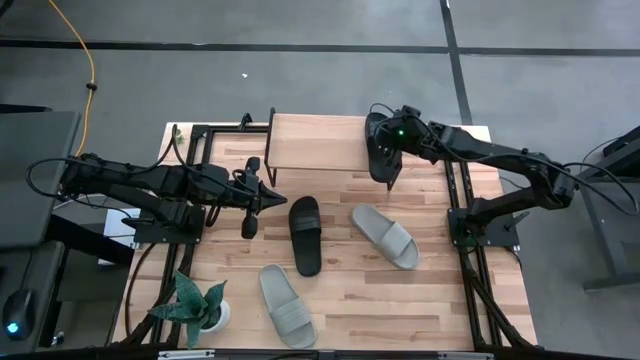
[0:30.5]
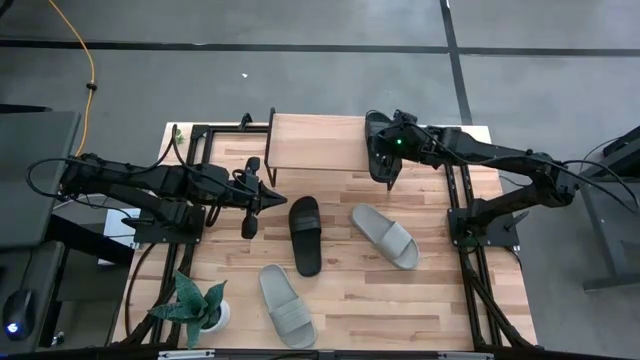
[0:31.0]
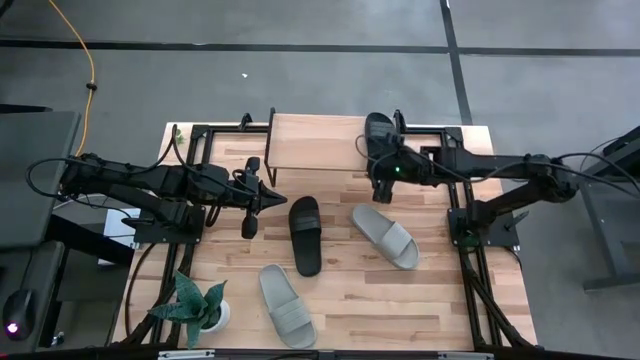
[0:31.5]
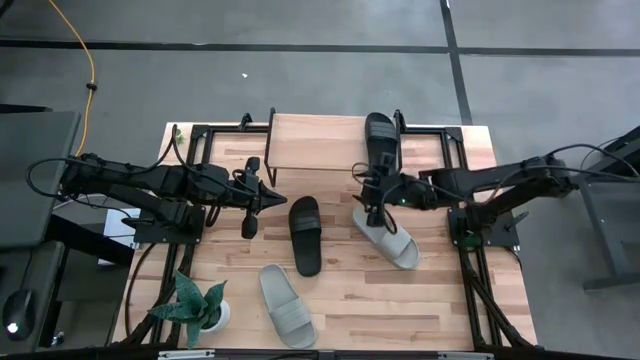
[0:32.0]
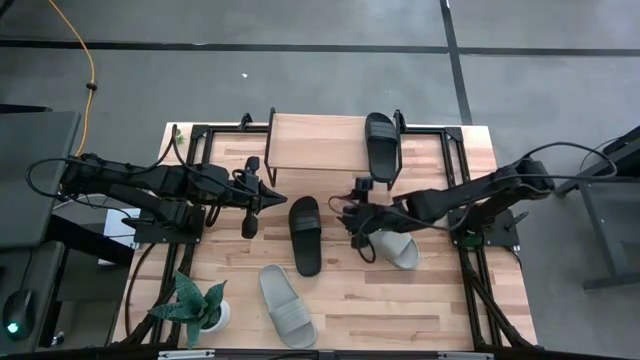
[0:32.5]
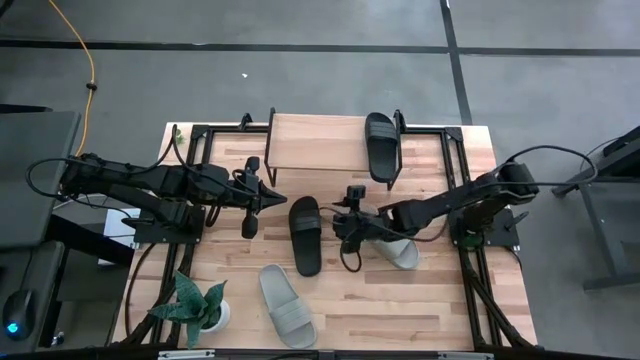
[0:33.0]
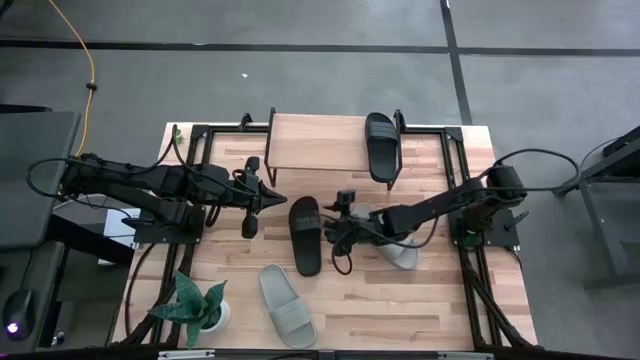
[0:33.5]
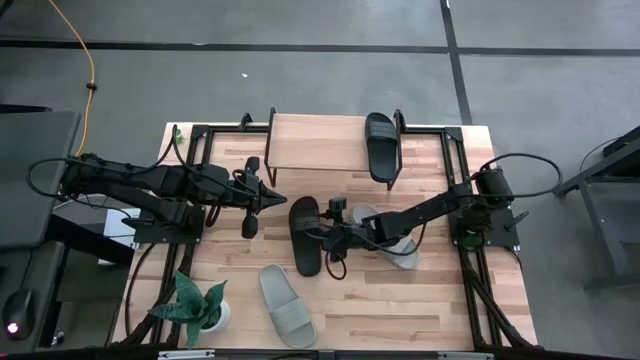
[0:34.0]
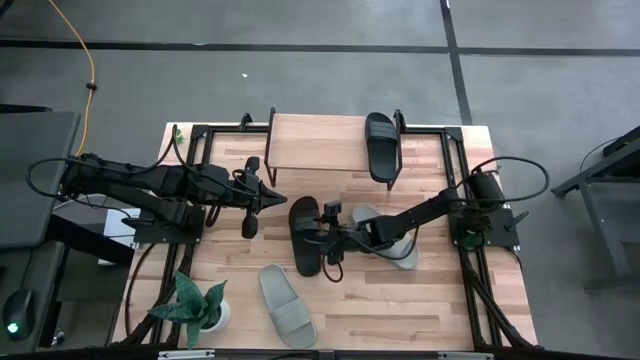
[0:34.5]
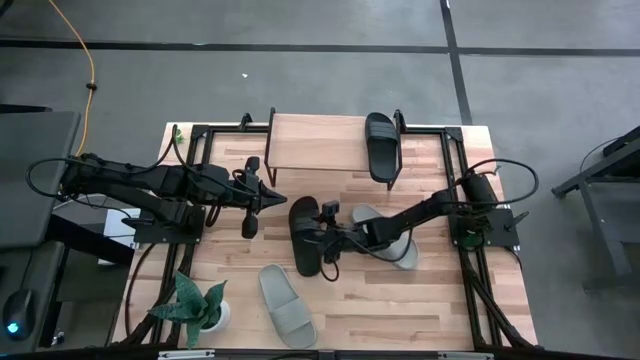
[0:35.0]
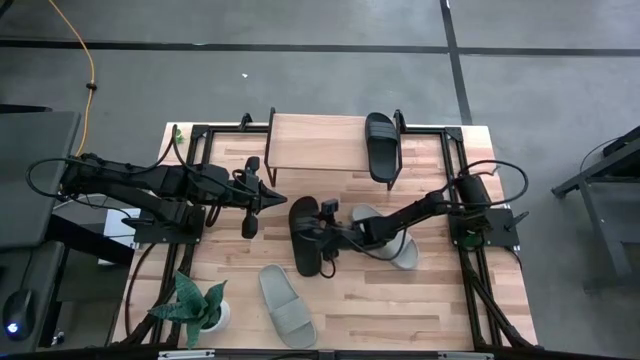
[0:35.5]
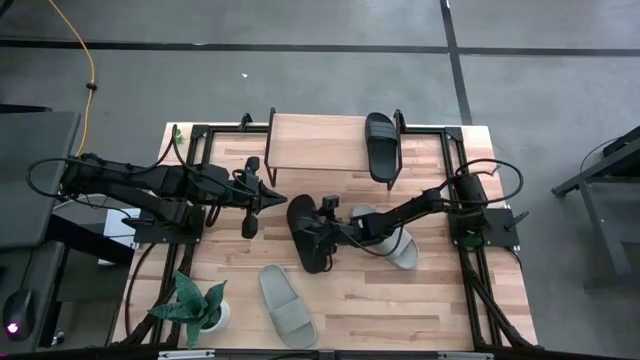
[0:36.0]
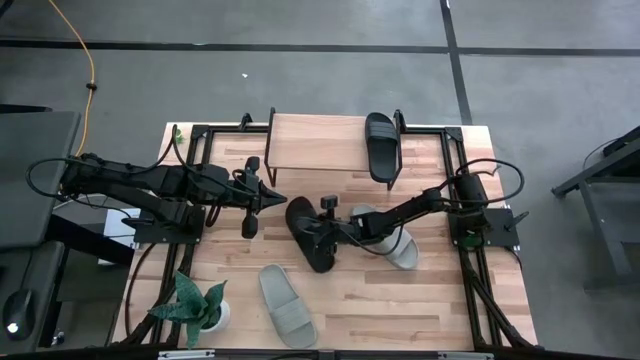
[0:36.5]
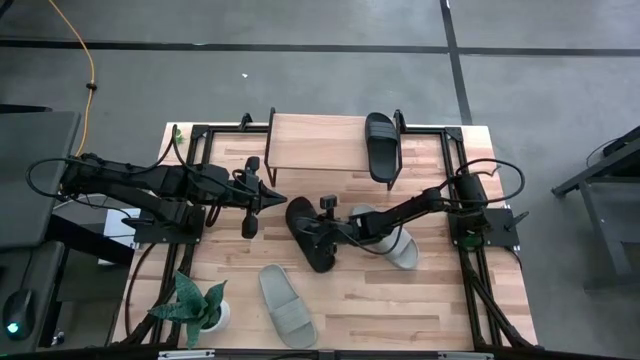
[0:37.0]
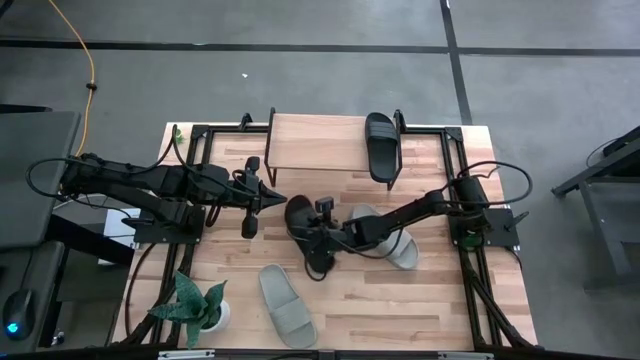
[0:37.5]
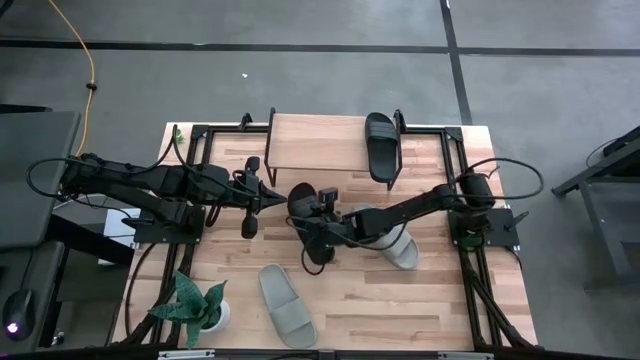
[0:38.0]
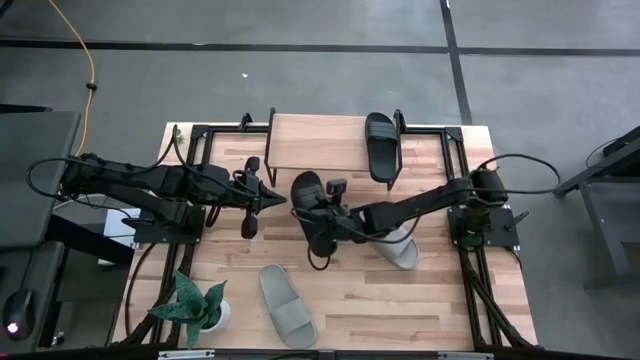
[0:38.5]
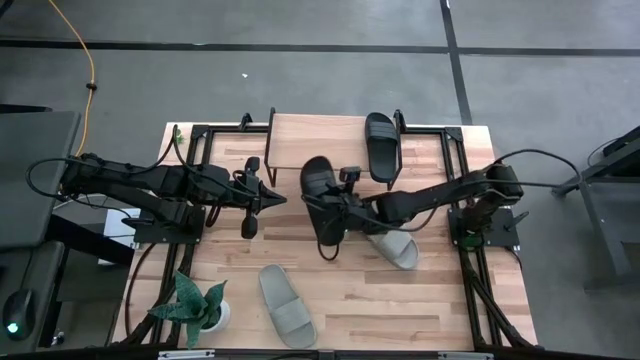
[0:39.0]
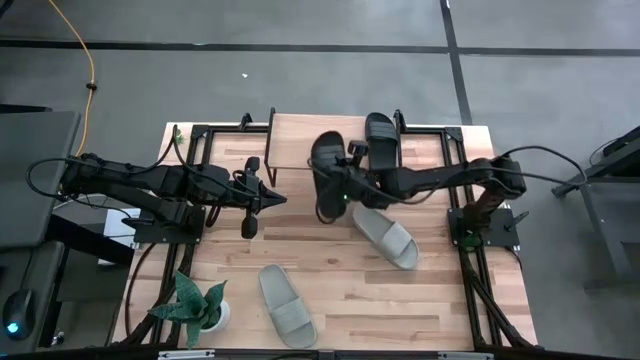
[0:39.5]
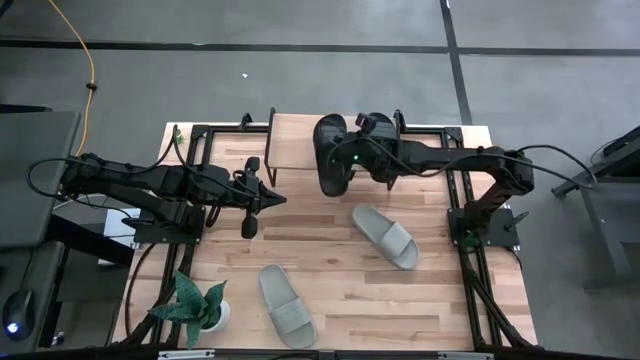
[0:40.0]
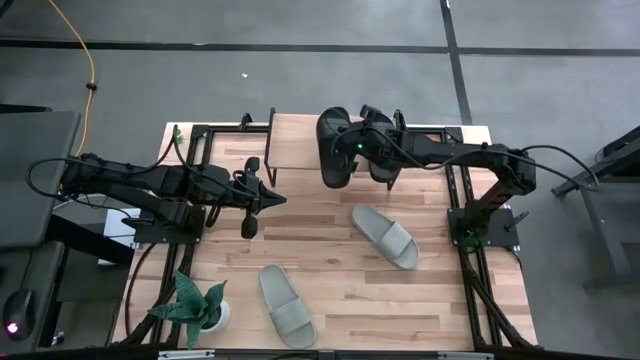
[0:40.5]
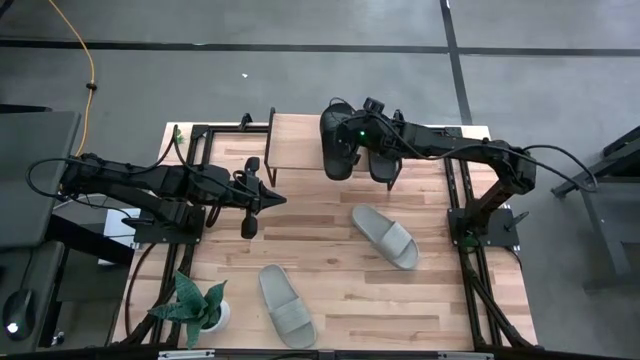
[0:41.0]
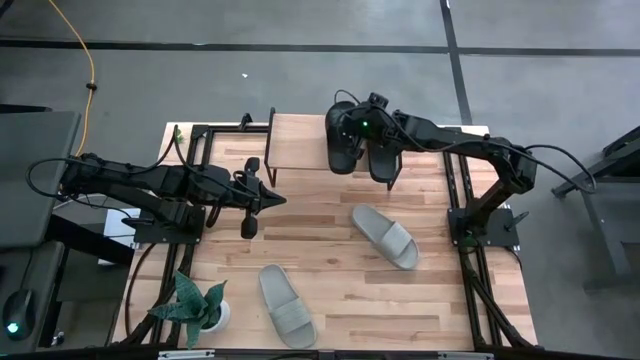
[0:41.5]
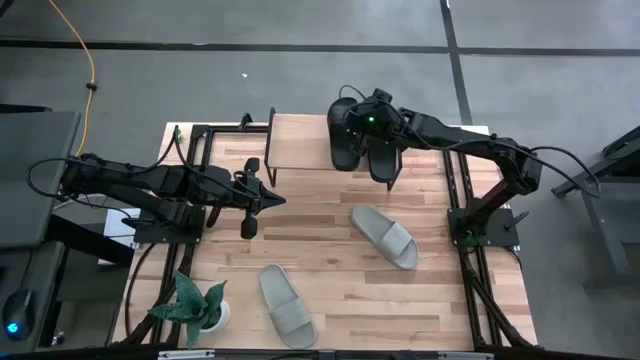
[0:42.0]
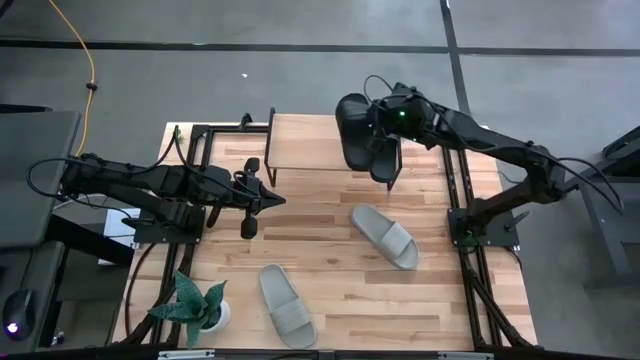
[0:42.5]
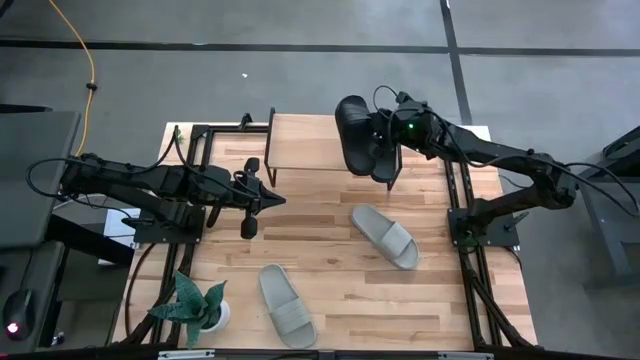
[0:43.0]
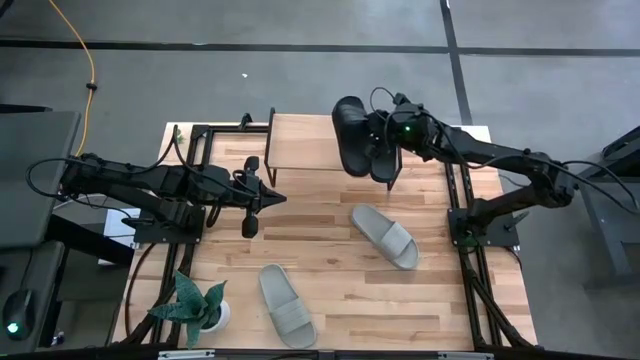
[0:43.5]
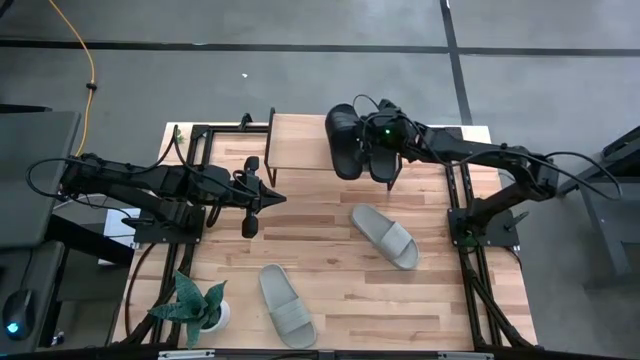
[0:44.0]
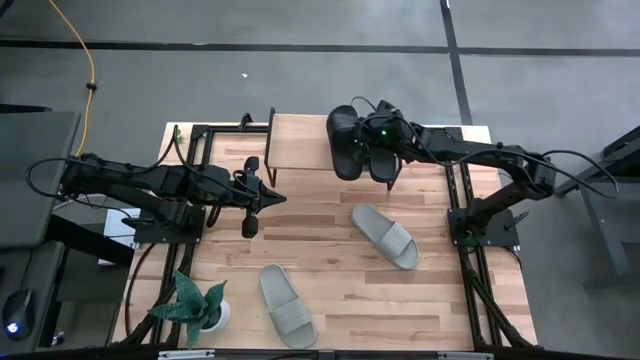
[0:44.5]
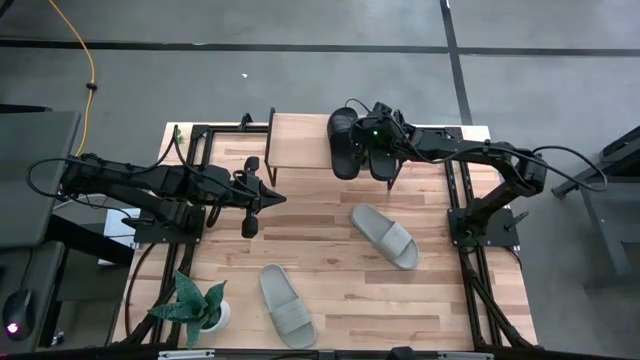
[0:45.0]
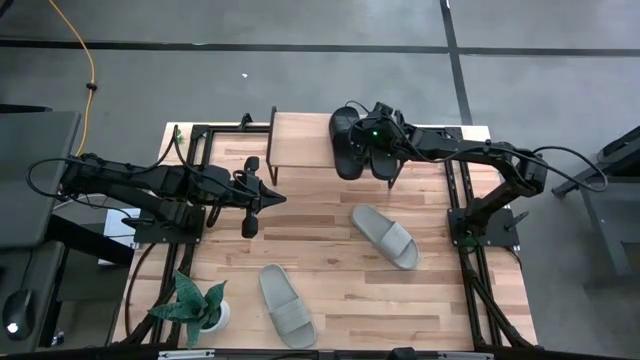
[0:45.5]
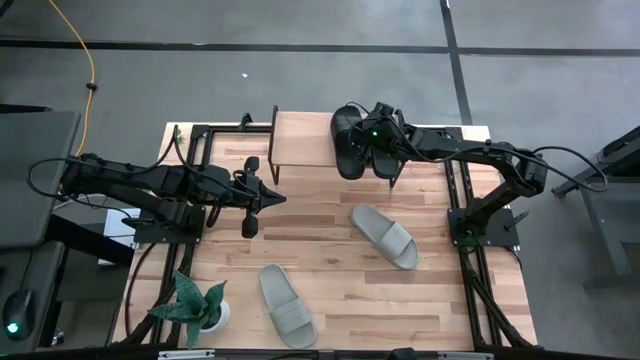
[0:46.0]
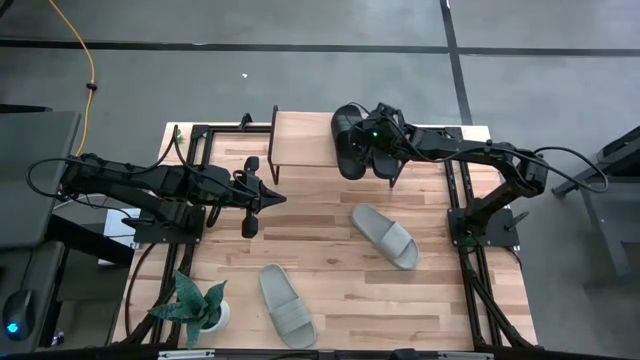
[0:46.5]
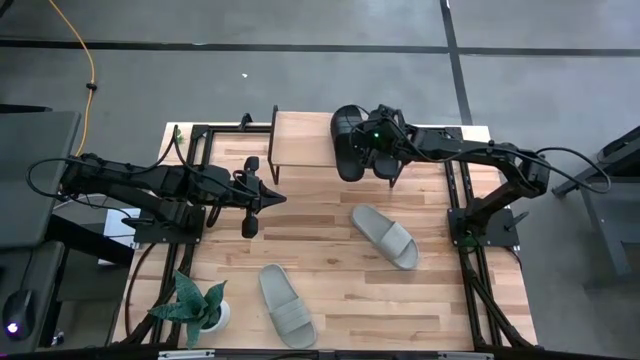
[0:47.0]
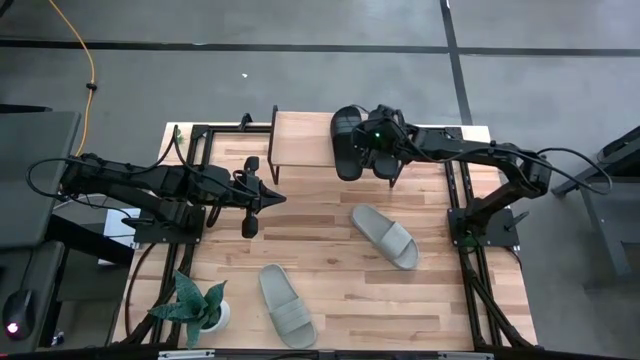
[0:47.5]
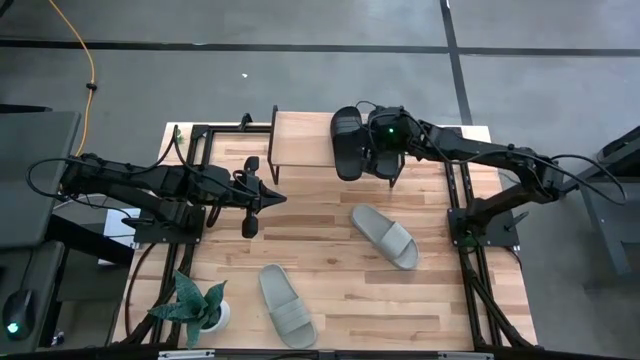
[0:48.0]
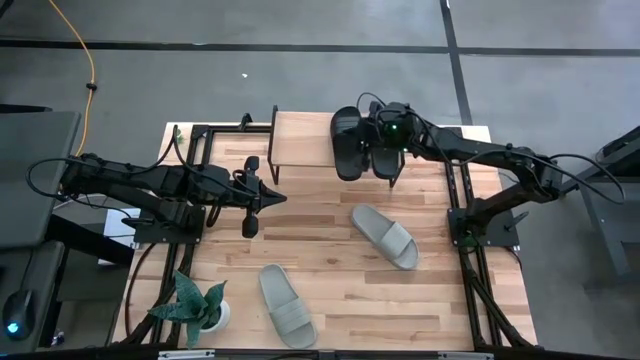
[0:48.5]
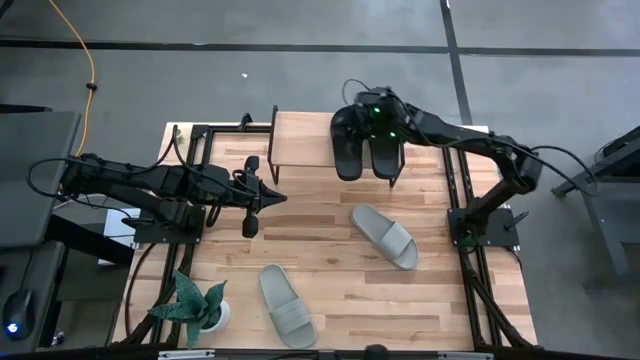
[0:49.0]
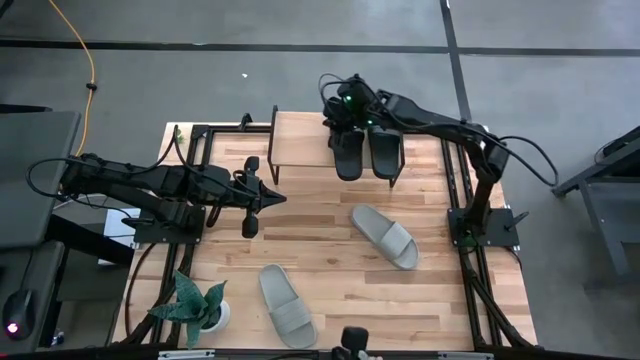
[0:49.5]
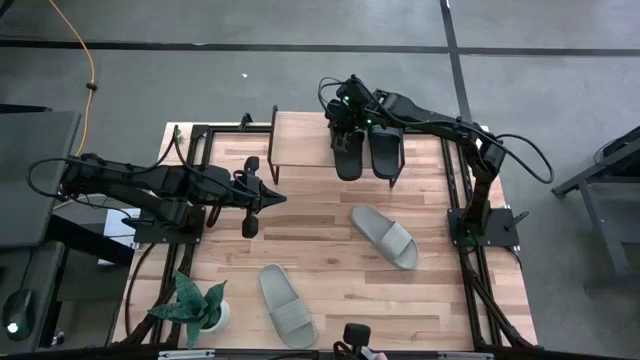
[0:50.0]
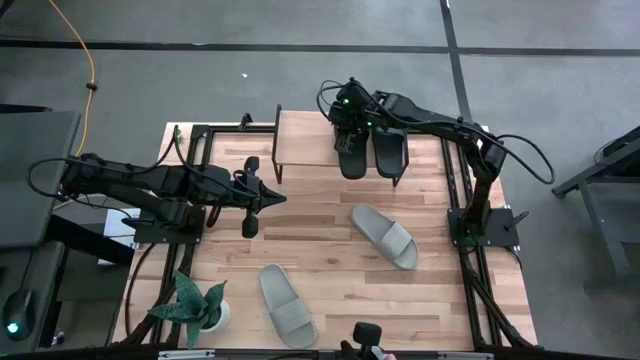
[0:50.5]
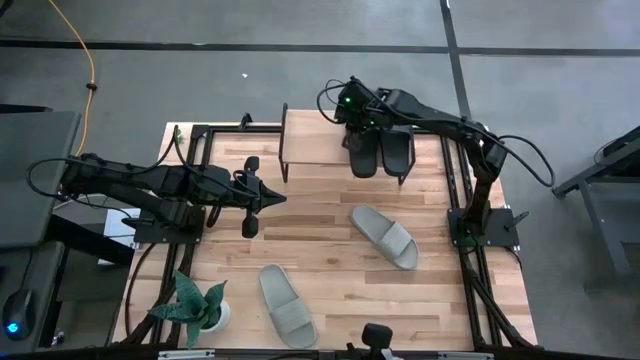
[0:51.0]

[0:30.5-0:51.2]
Task: Pick and place slides into the shelf
Put the black slide on the shelf

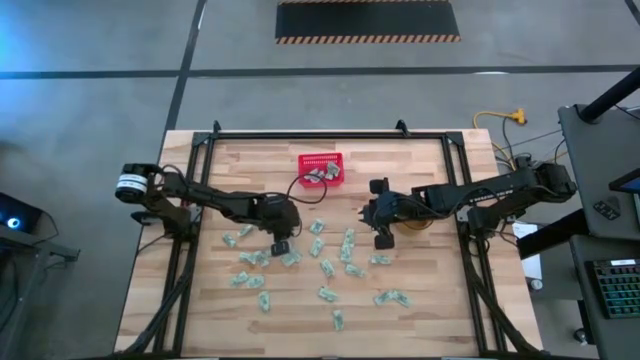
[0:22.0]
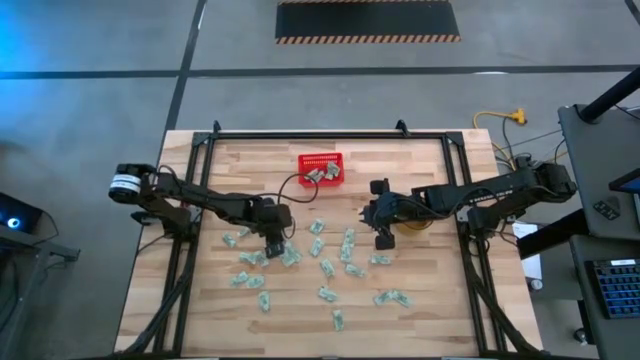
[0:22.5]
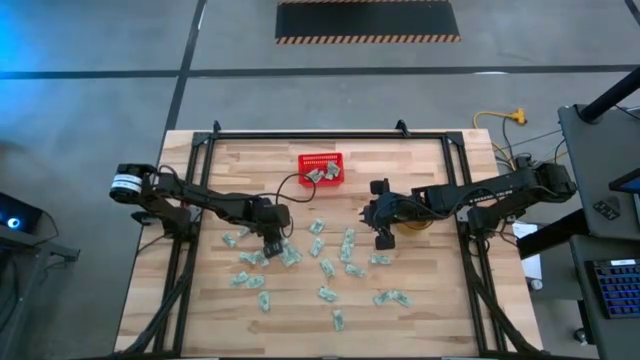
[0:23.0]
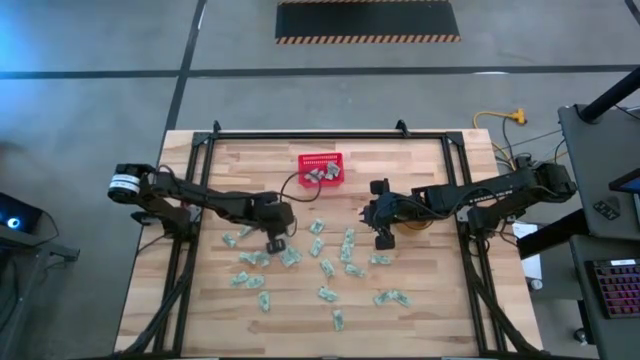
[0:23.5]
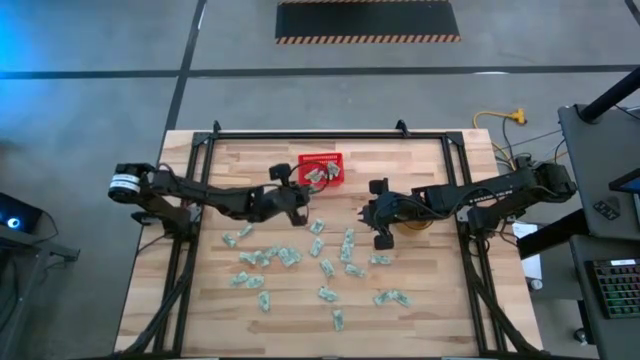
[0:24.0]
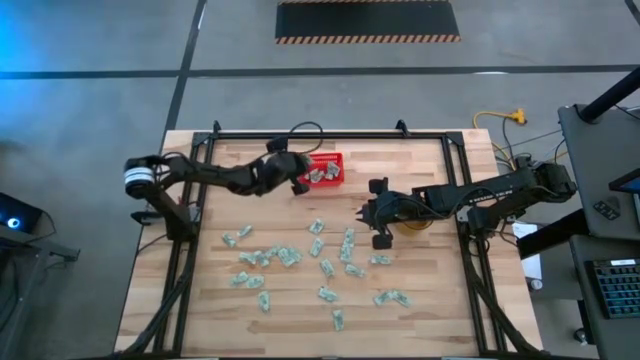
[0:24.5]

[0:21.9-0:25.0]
Task: Pick and place Stevia / Truvia into bins
Put the white stevia packet into the red bin
